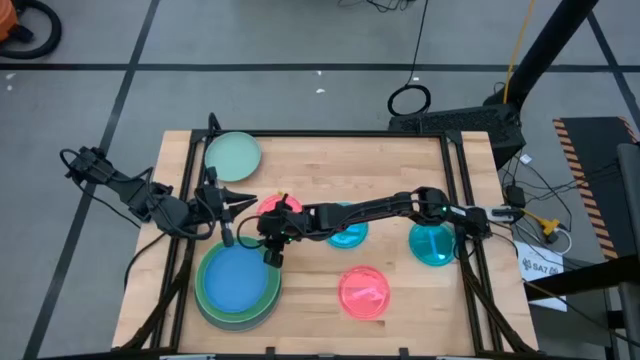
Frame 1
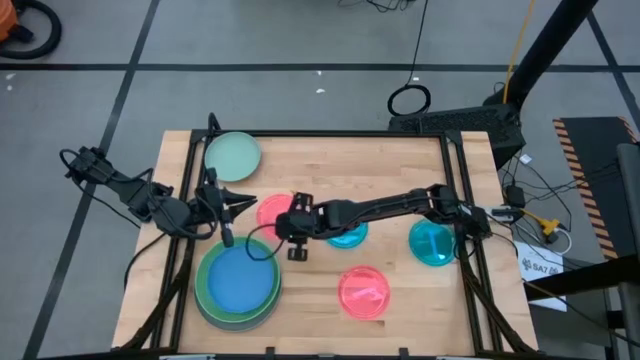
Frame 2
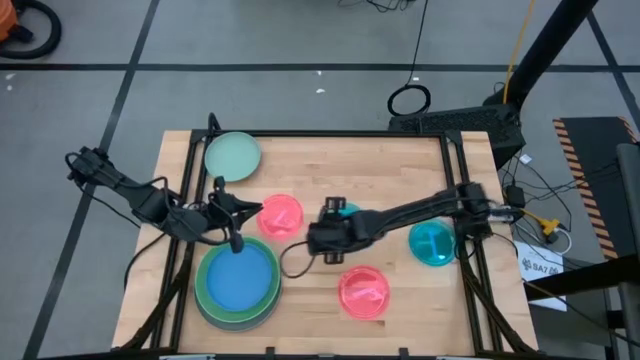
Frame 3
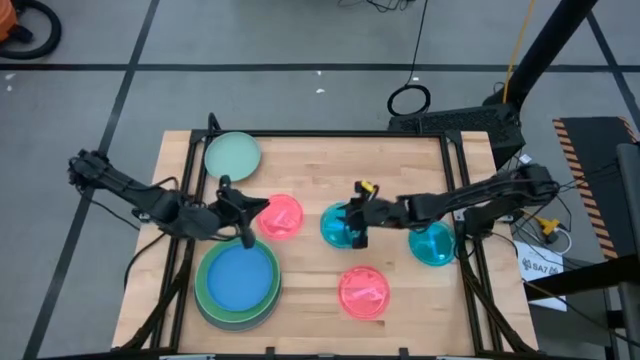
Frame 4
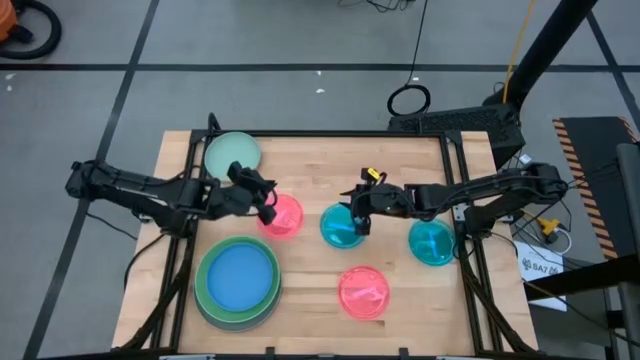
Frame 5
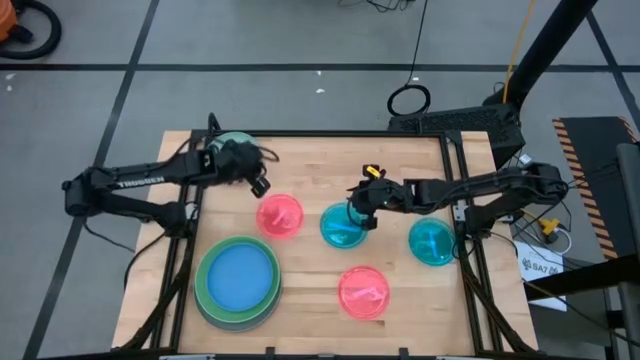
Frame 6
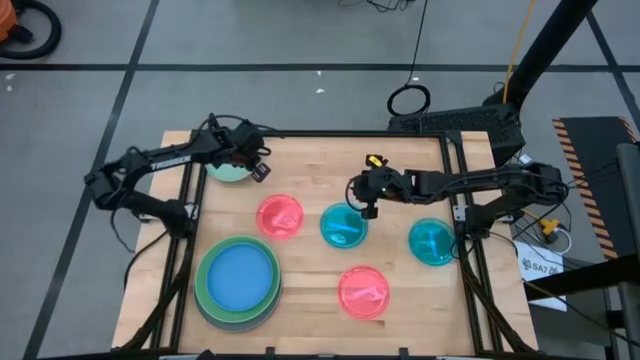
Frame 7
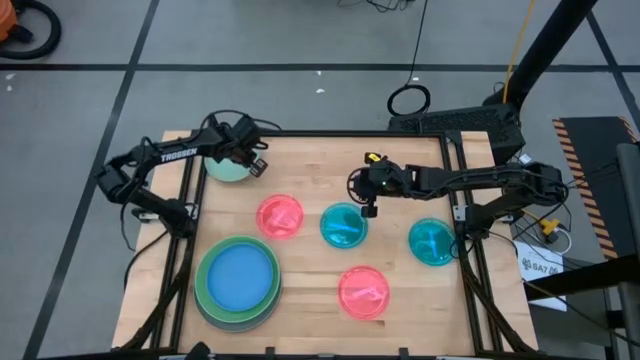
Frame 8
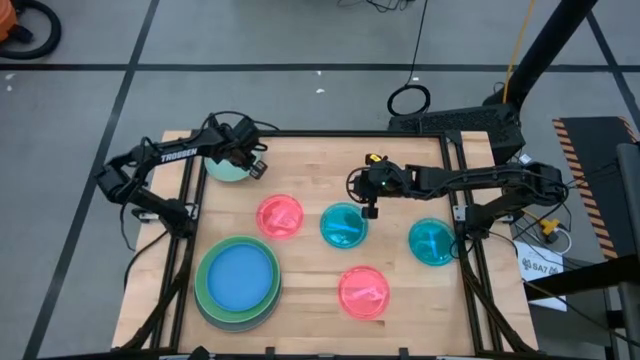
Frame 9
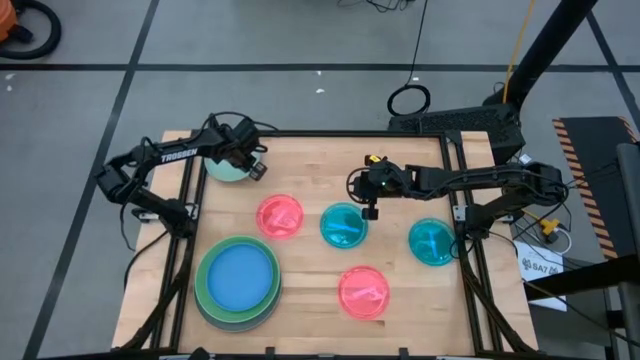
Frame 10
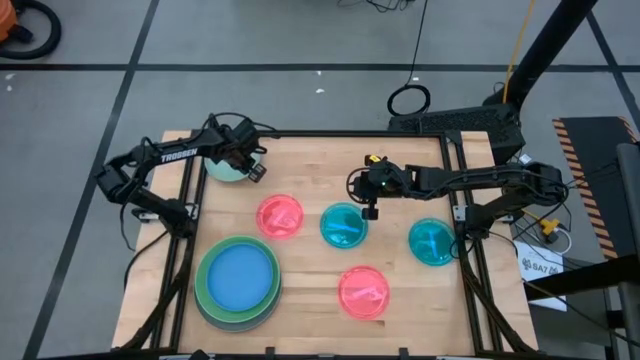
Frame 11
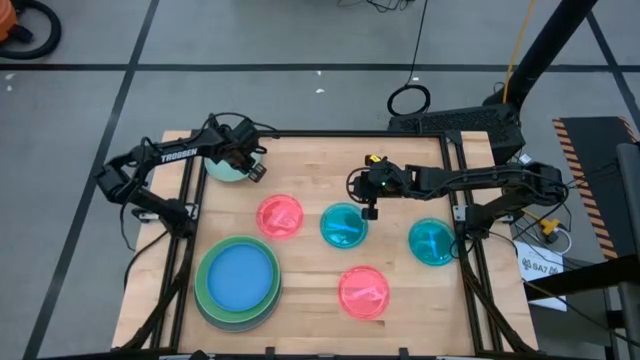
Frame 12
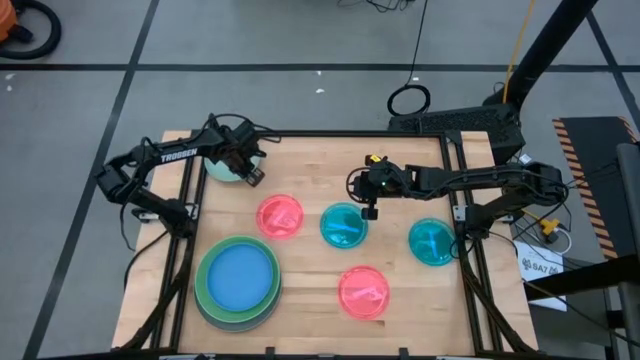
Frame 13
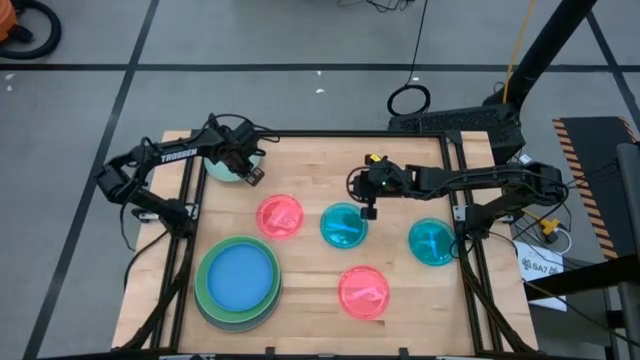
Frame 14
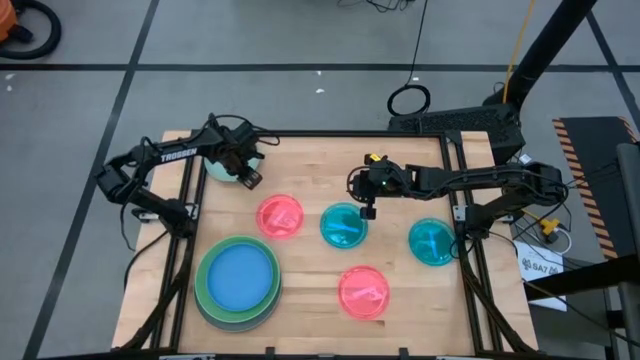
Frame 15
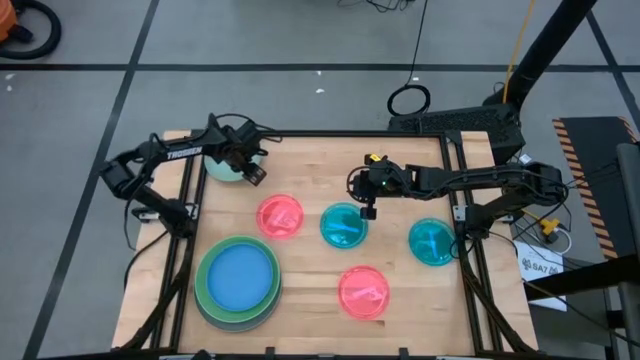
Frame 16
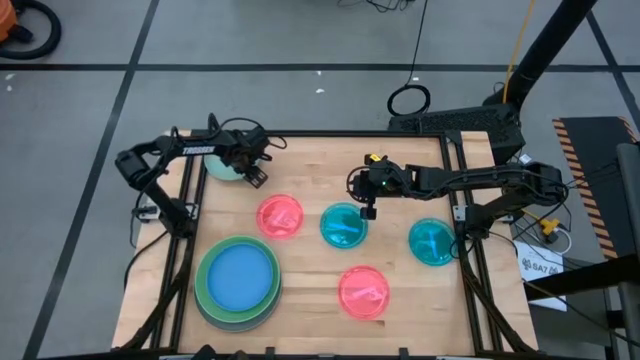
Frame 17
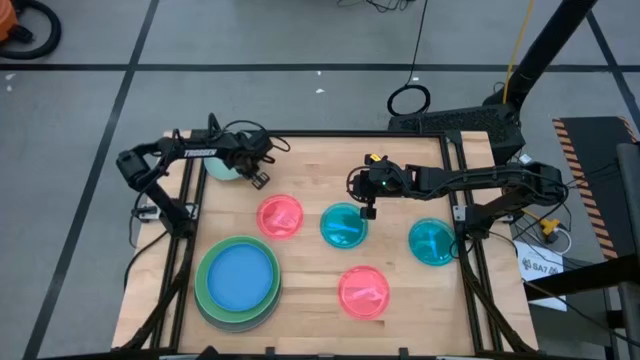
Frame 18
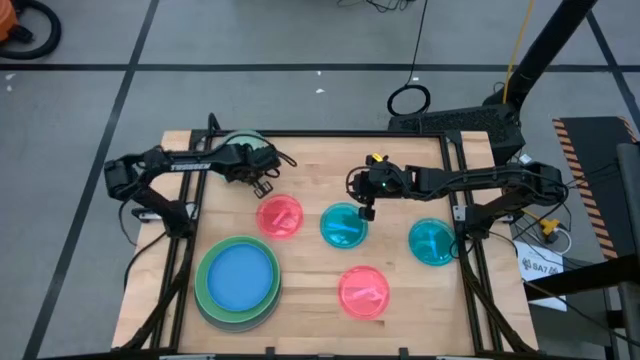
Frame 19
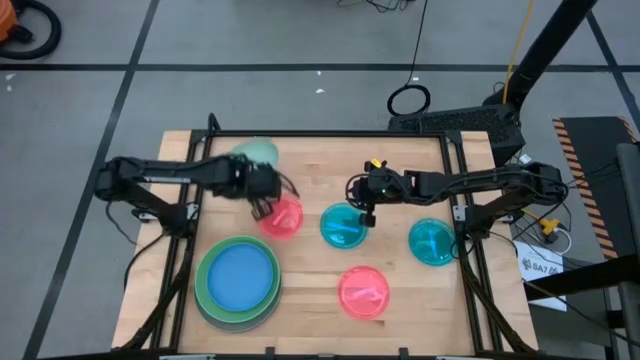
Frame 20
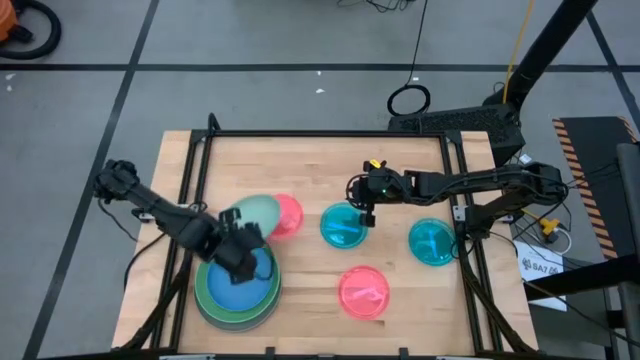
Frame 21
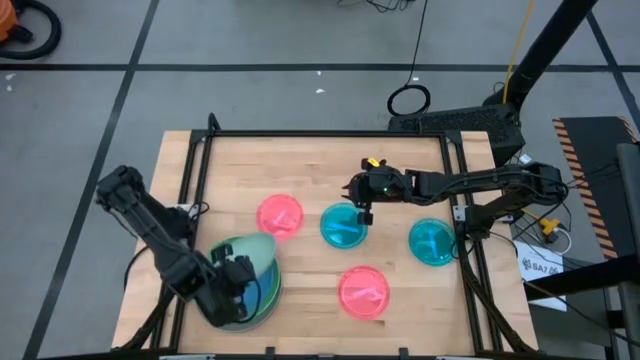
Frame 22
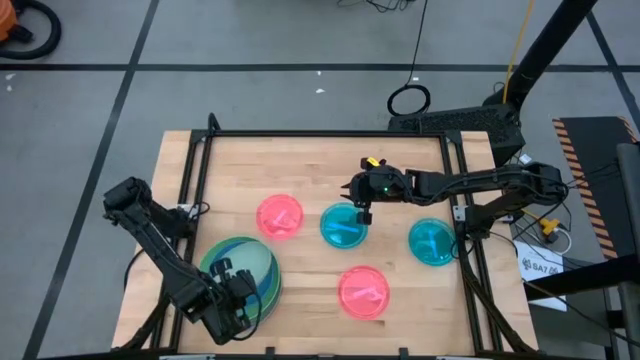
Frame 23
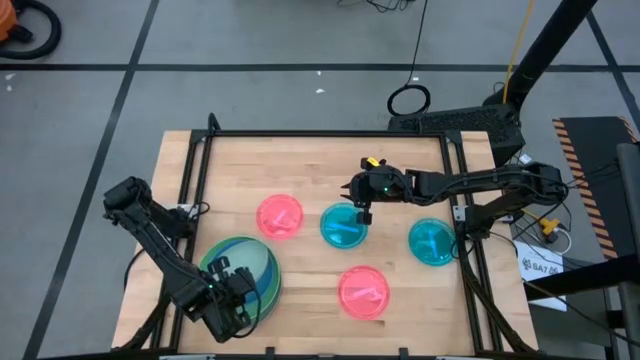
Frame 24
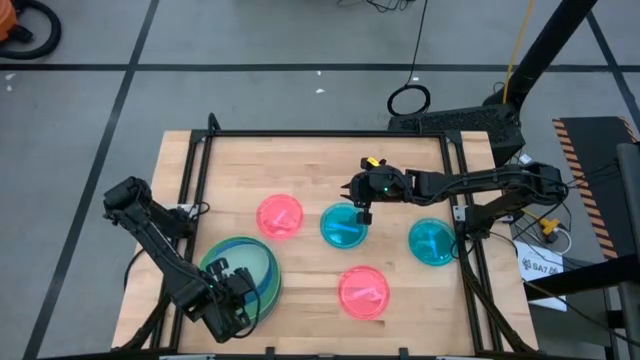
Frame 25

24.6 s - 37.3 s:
Task: Stack plastic plates
Stack the light green plate on the blue plate

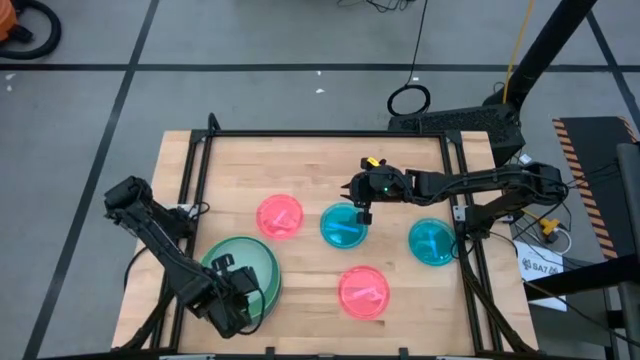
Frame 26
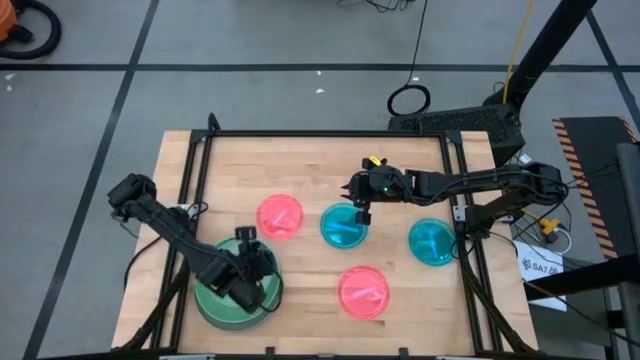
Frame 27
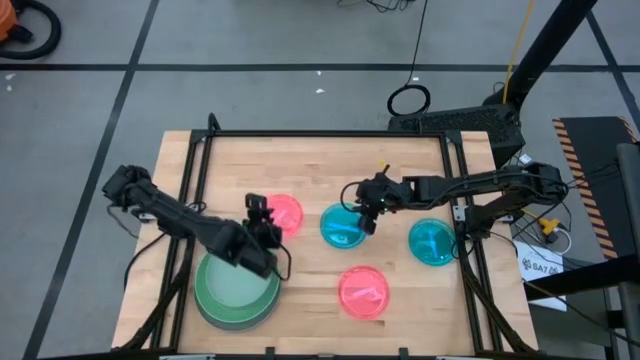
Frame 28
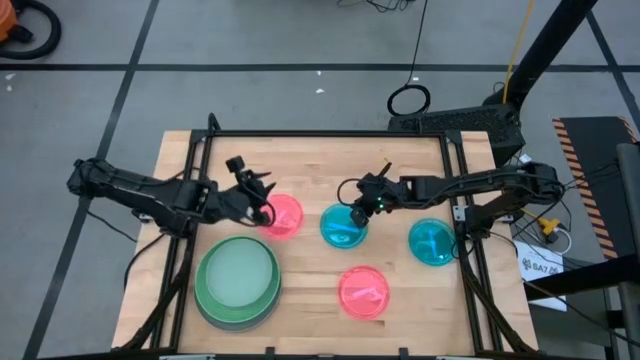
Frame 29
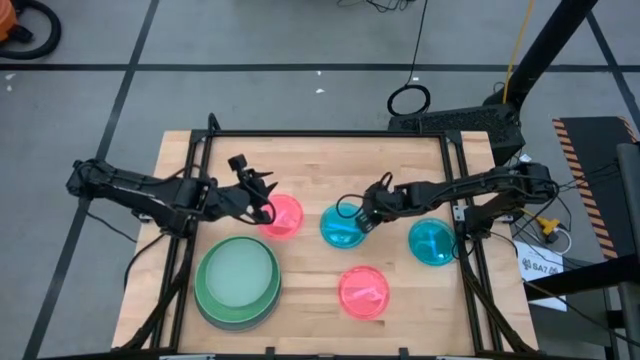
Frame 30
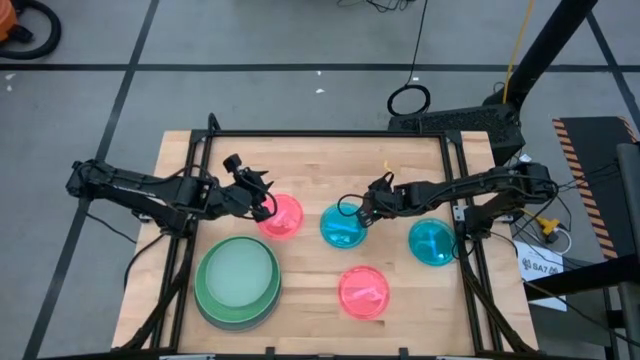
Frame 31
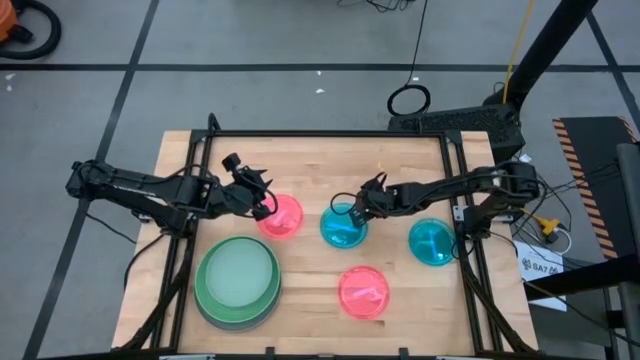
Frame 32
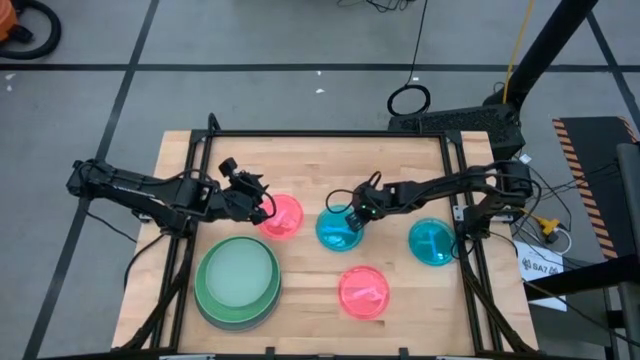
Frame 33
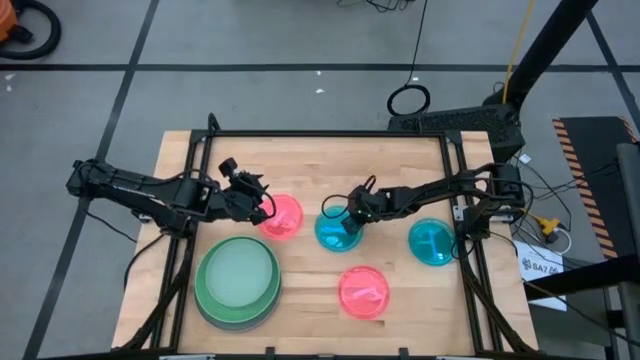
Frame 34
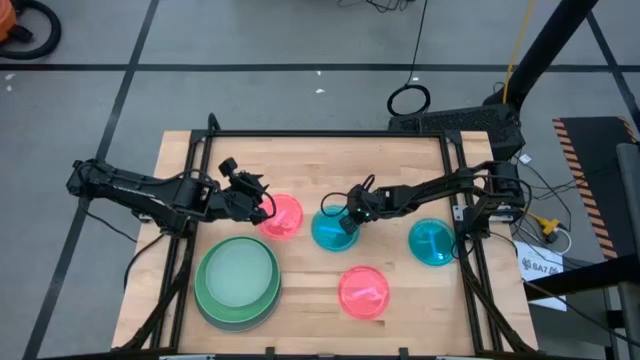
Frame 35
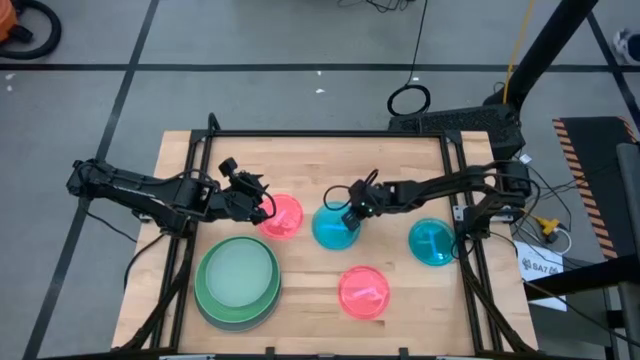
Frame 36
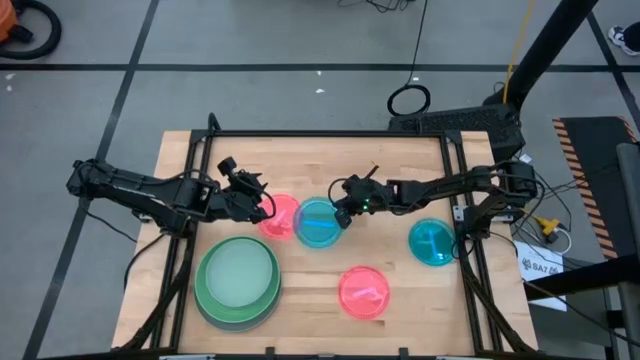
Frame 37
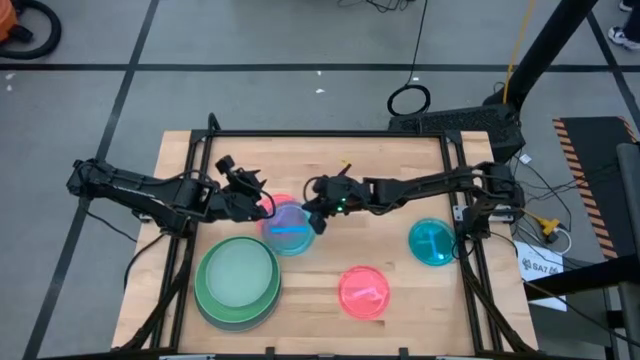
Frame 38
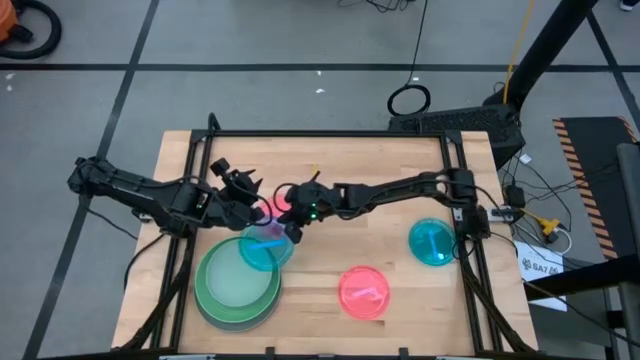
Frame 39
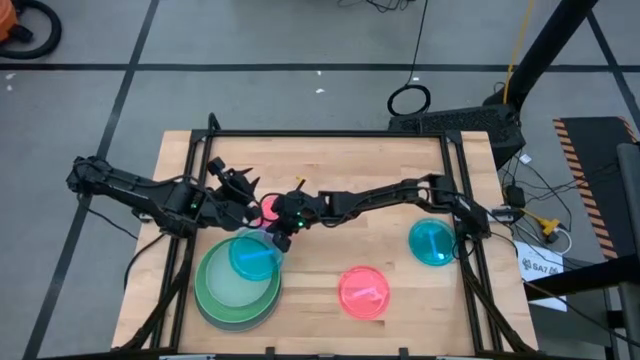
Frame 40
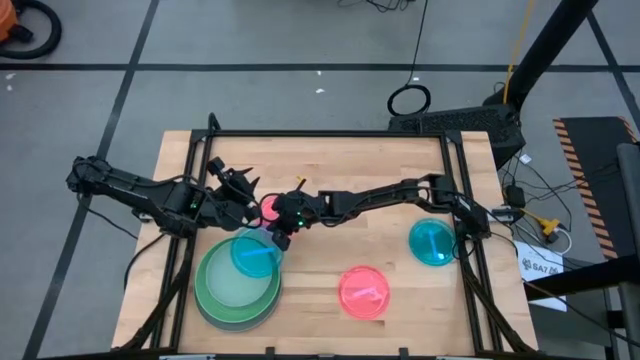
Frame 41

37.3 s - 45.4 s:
Stack the left transparent blue plate on the light green plate

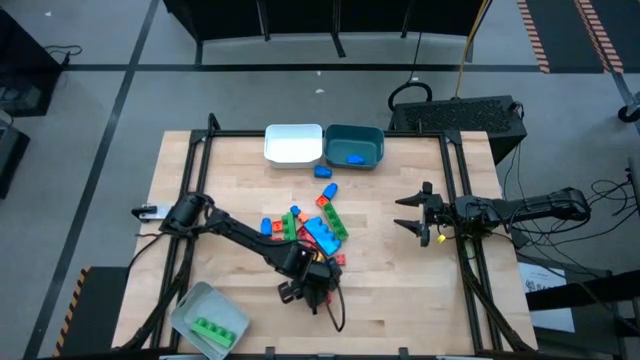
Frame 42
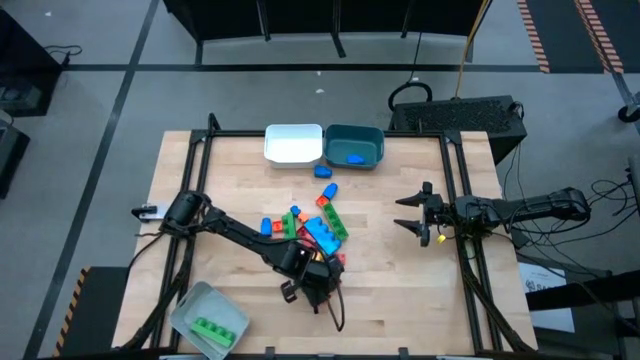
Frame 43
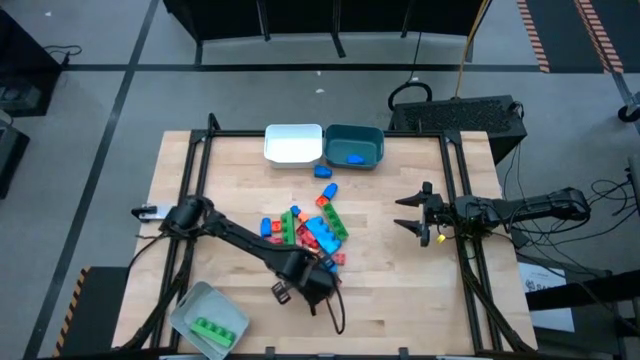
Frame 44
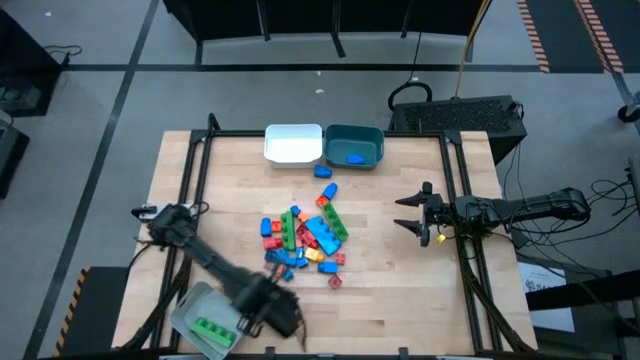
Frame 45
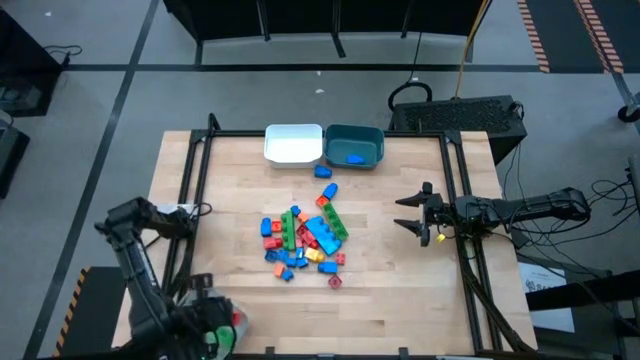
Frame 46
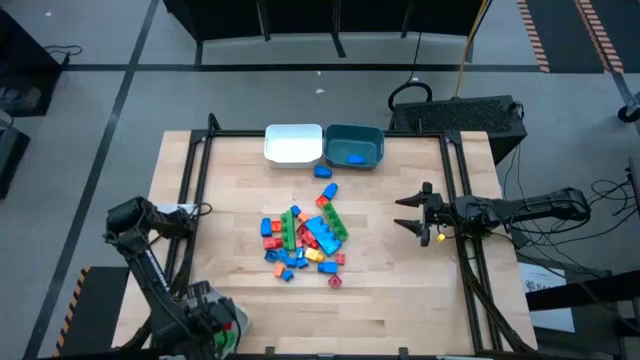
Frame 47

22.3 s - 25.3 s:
Task: Sort blocks by size
Put the red rectangular 3 stud game piece into the gray bin
